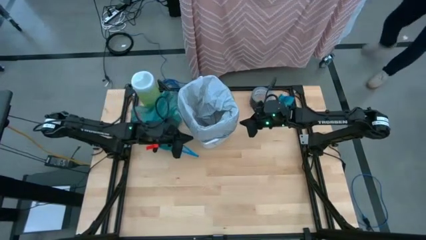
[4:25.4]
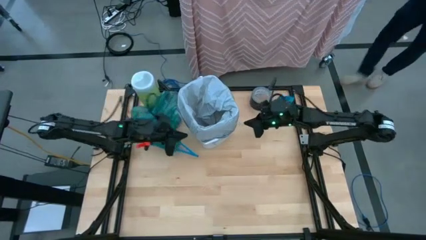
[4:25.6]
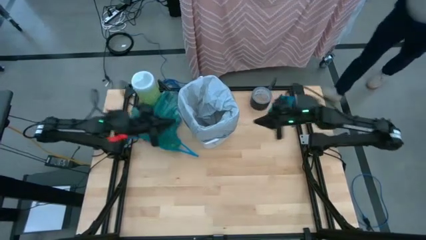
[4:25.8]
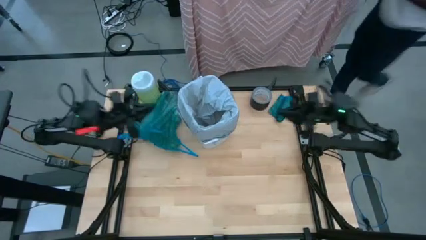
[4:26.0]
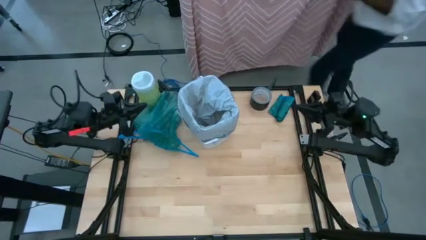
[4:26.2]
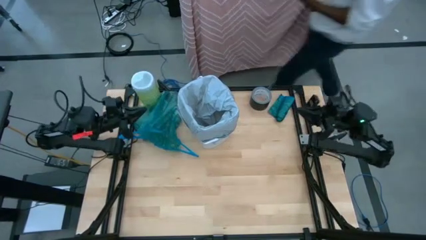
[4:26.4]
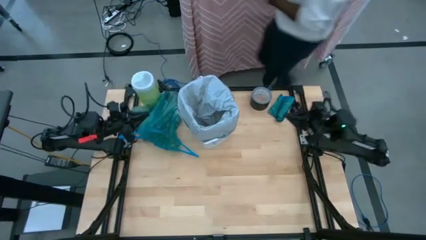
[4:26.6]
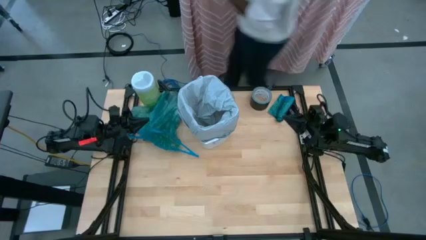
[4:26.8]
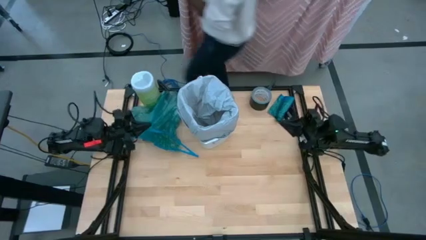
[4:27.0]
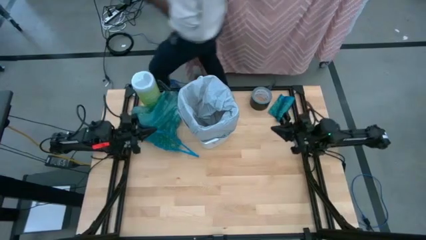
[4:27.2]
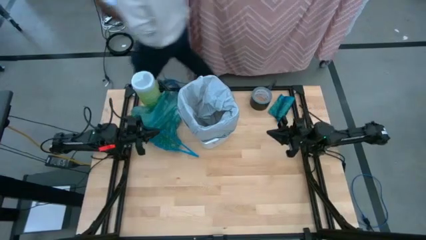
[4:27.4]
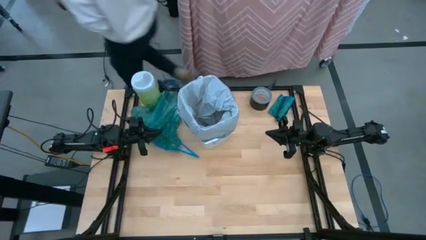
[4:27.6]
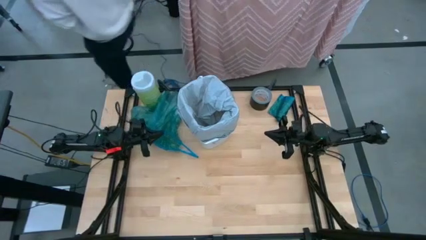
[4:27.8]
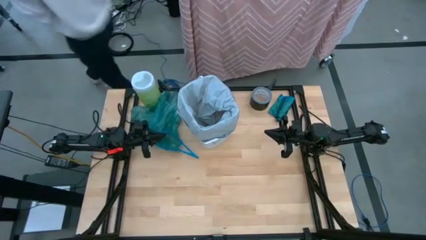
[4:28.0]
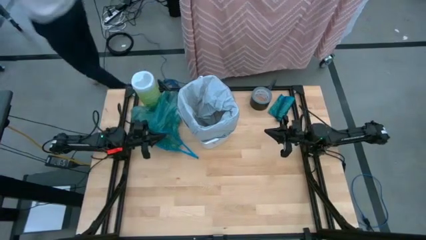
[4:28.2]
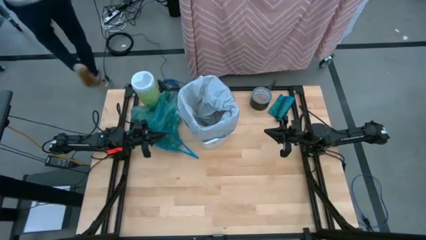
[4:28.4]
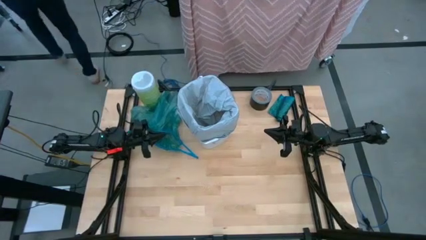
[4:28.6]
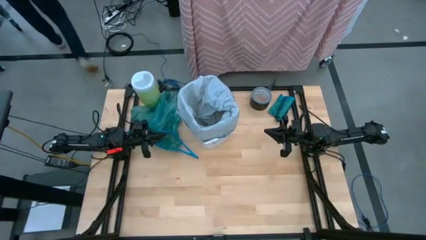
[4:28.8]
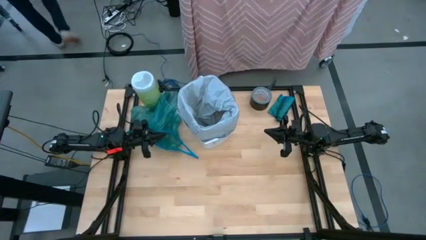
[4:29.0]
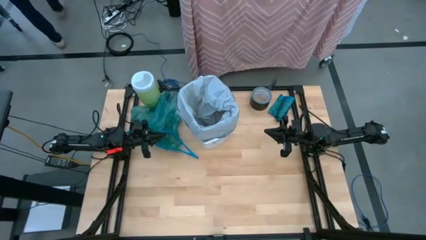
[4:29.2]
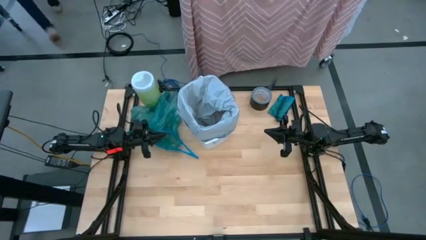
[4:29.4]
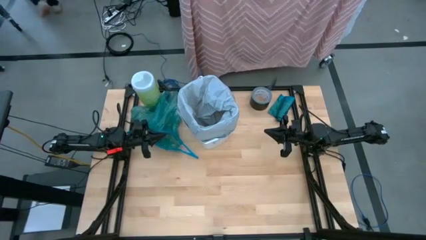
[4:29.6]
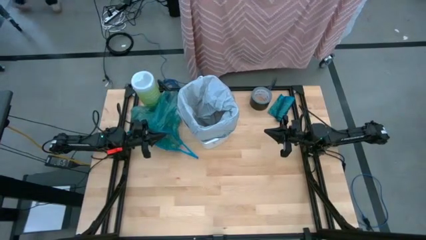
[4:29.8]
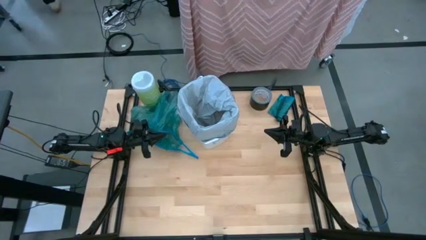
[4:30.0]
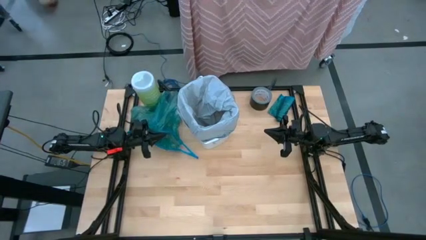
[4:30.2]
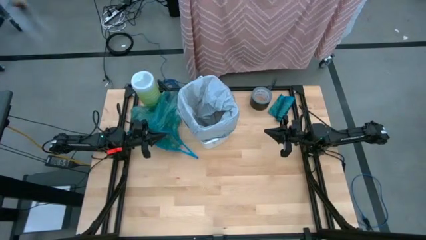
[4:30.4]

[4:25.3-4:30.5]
Task: place trash/remove bag and relplace
Return to Home Position

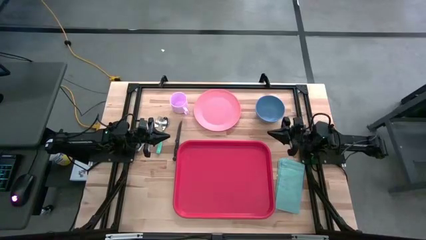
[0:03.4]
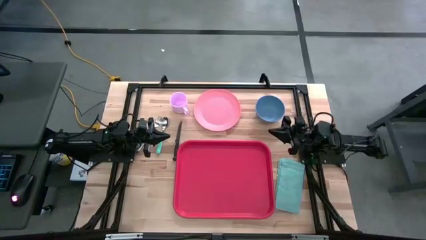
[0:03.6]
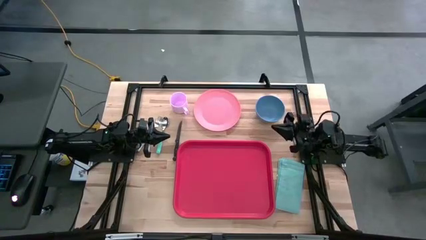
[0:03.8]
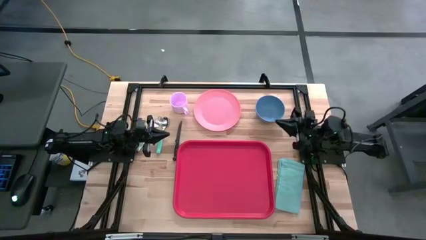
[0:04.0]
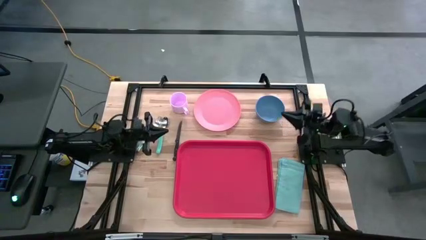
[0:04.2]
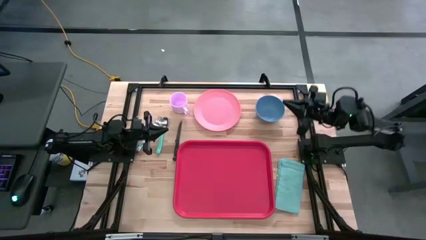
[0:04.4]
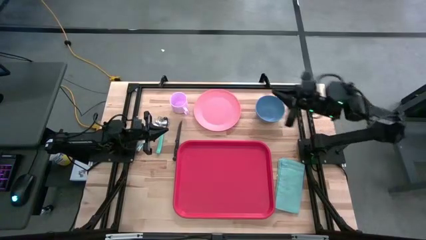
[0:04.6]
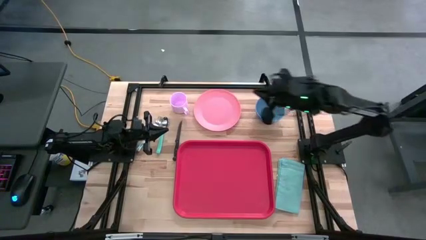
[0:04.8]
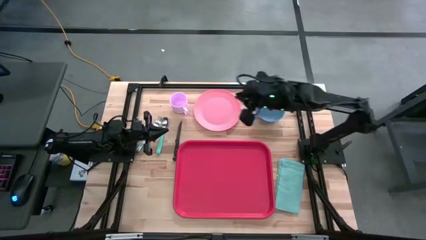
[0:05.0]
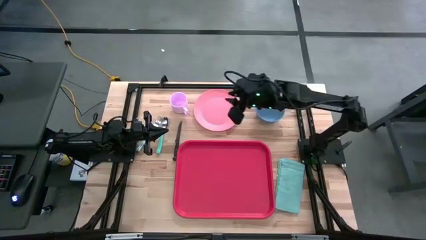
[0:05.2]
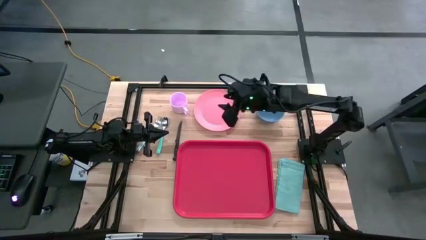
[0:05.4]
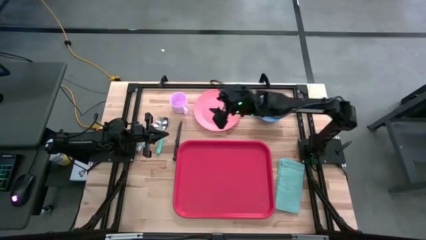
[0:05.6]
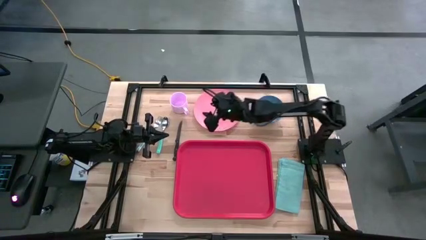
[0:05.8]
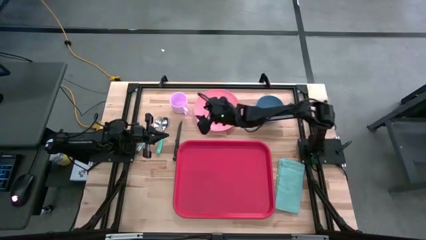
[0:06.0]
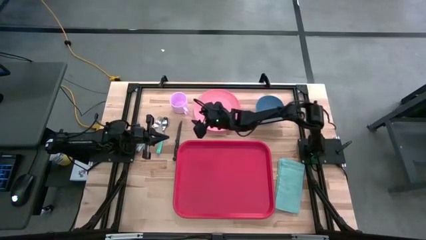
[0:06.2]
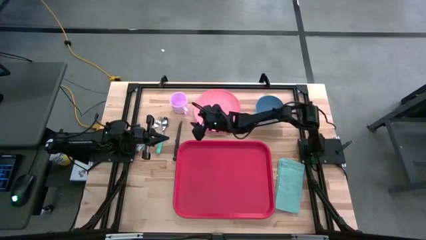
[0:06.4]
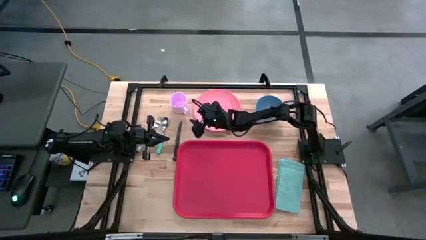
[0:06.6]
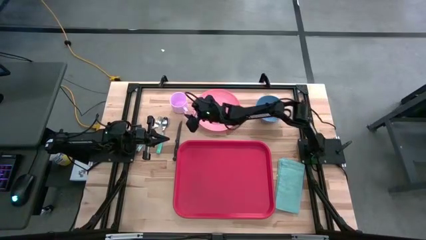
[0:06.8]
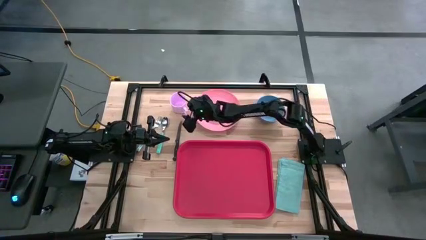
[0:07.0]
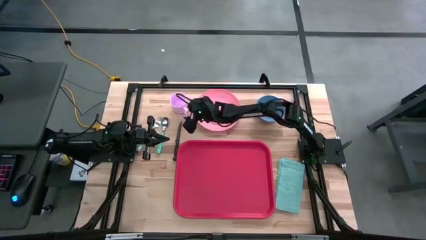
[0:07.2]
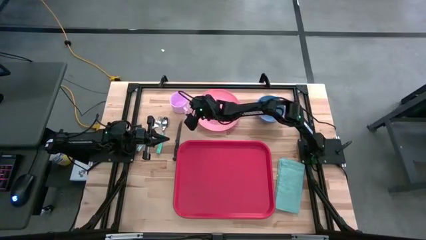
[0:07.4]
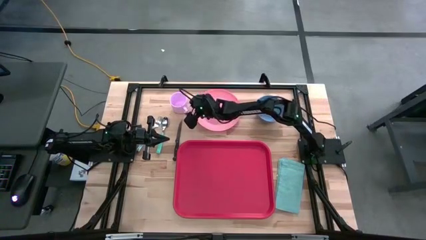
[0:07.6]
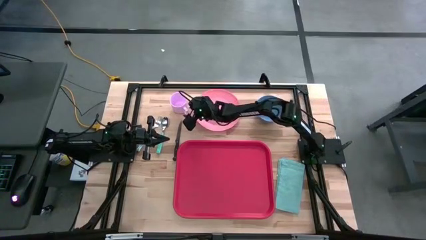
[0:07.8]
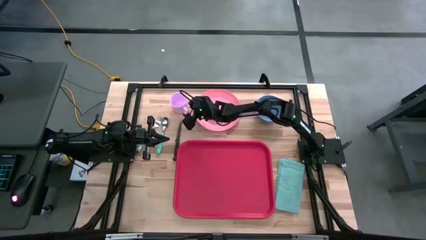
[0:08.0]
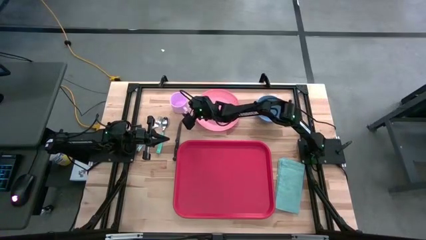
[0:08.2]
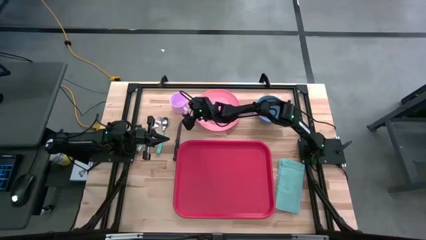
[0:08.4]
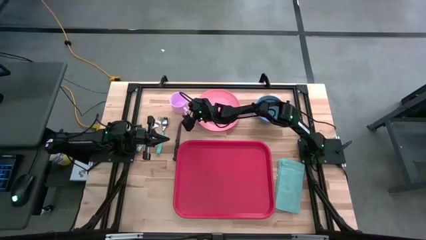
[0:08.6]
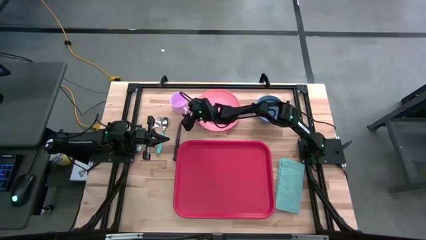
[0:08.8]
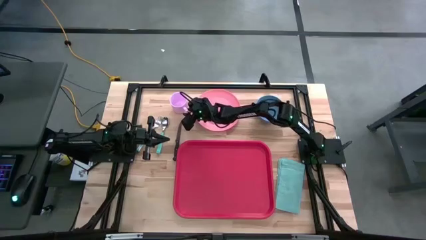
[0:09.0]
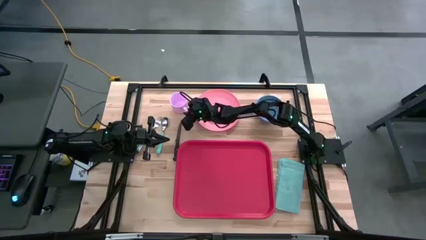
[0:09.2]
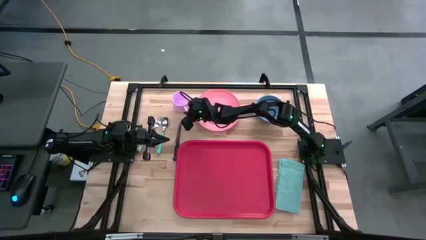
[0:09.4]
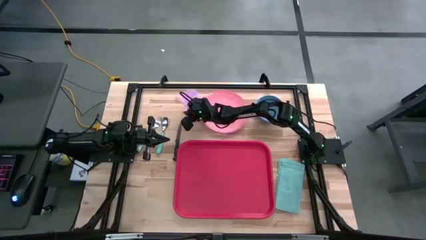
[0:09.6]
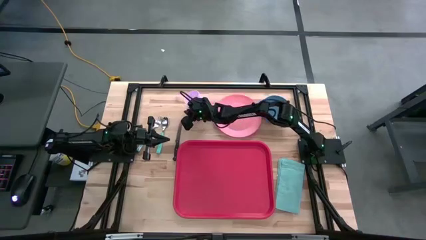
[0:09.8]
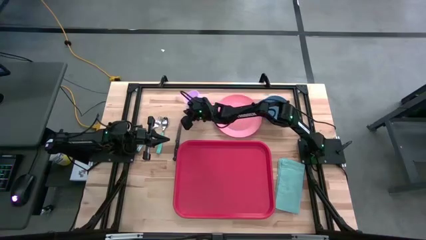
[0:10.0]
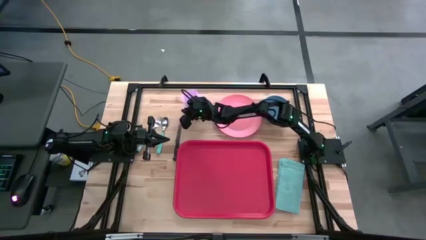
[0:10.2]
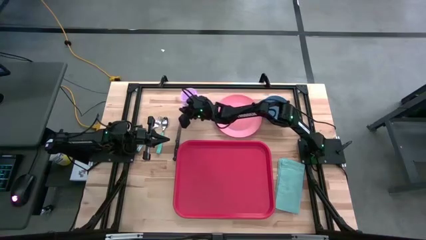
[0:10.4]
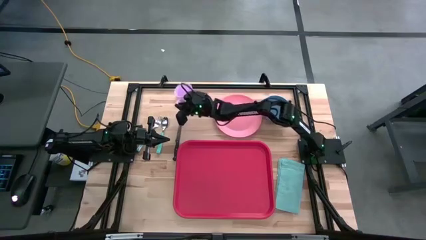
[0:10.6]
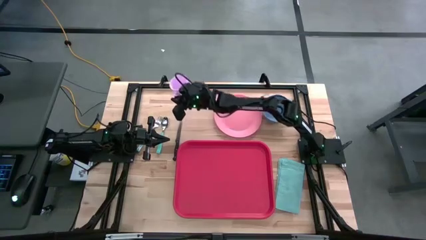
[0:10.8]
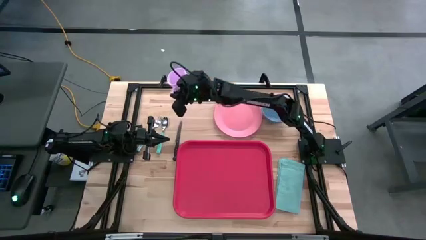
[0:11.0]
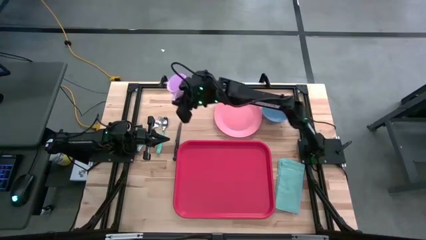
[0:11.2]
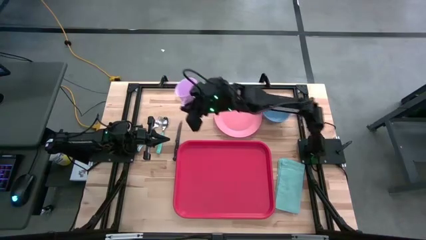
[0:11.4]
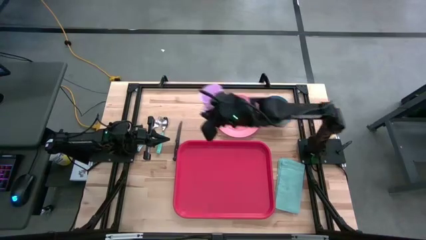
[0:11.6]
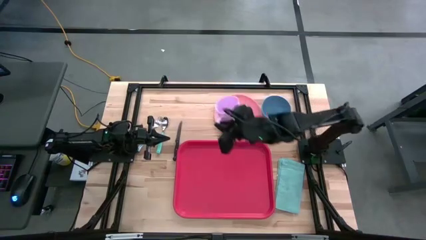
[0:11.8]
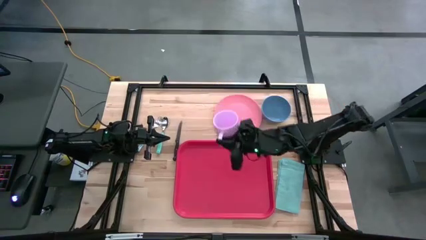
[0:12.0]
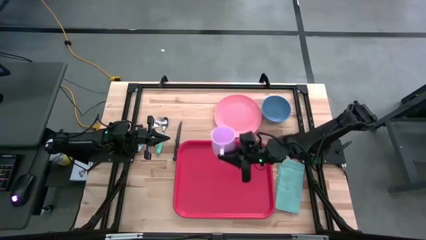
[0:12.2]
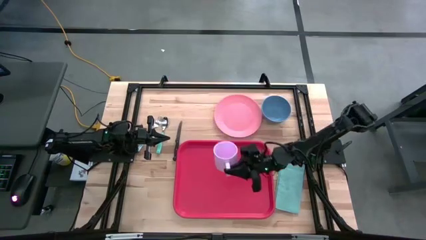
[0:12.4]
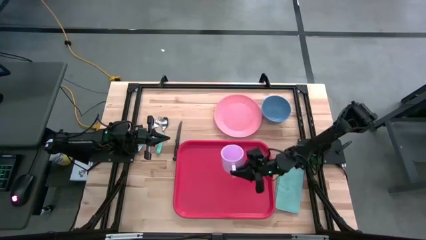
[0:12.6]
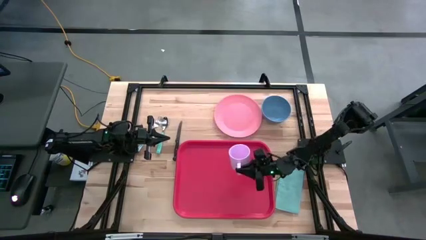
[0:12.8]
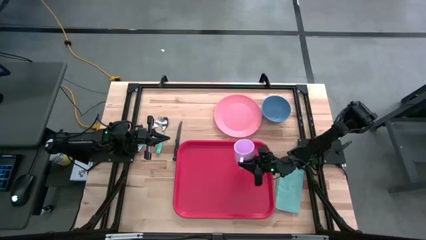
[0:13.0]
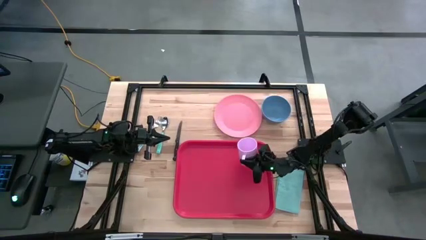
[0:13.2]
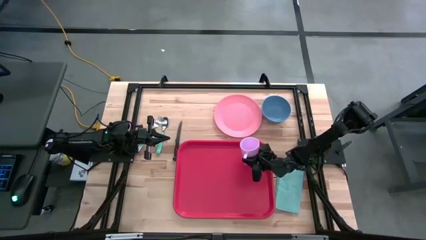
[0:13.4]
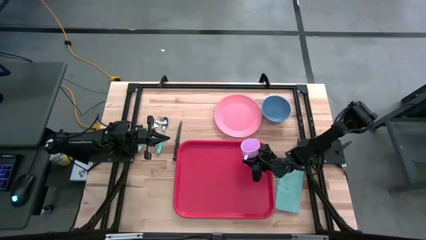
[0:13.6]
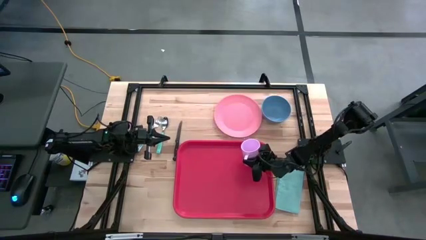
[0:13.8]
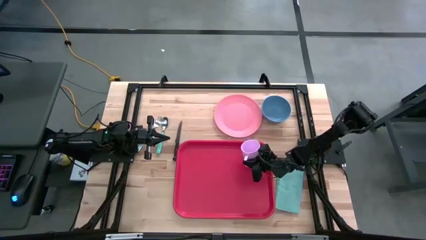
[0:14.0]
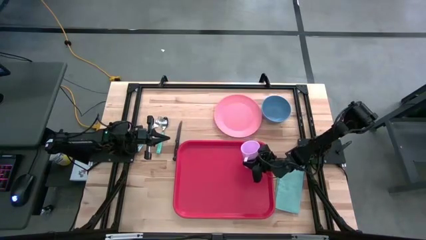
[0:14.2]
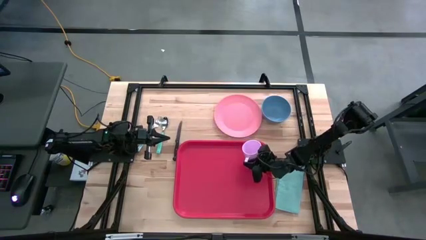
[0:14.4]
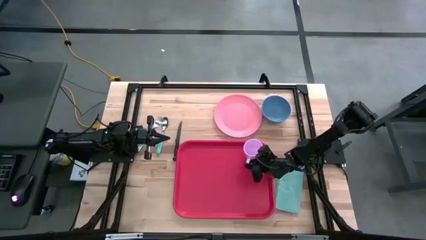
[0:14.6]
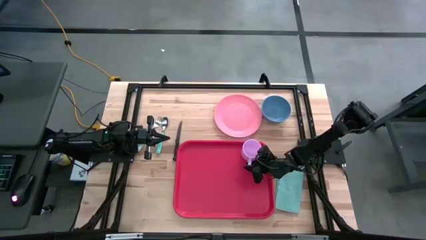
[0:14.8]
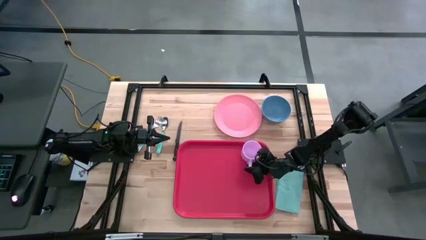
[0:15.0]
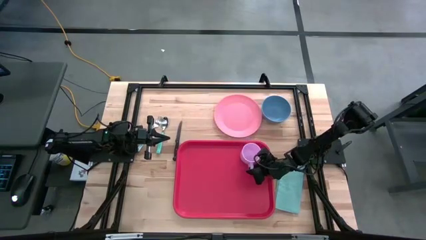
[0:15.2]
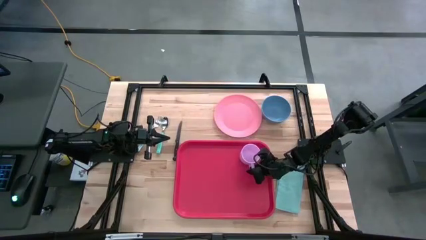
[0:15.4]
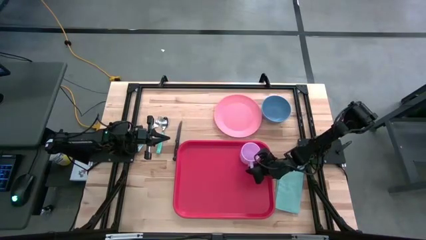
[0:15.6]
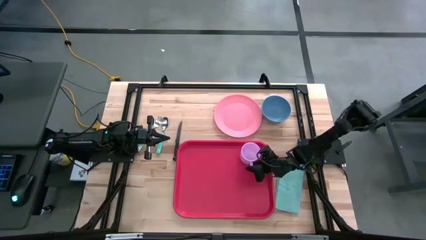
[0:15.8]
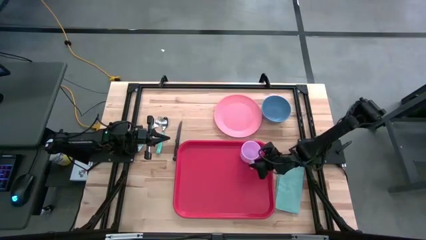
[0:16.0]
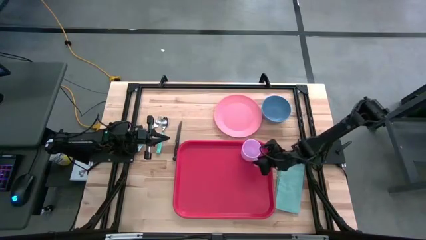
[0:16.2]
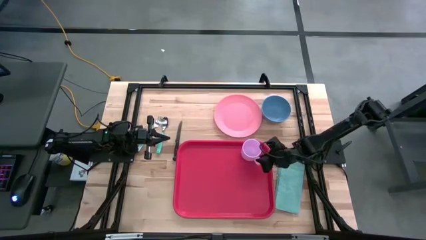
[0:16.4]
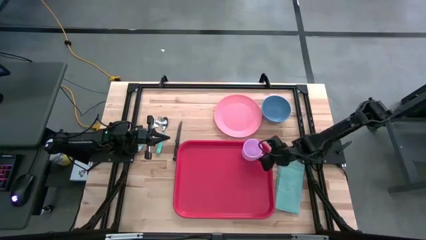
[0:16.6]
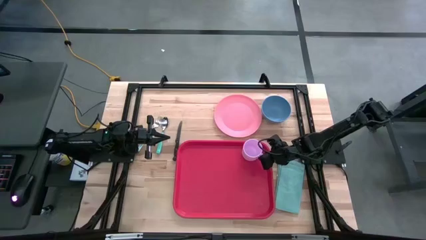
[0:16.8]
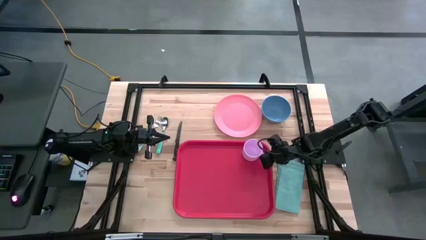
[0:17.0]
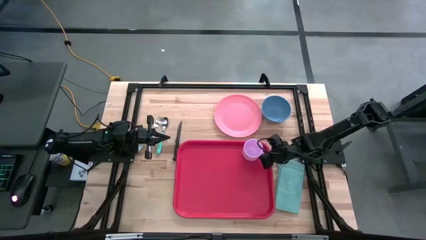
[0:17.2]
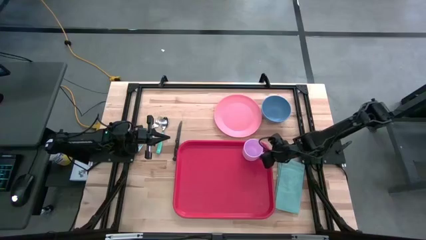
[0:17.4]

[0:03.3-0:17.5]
Task: Set up tray
Put the purple mug into the pink serving tray
